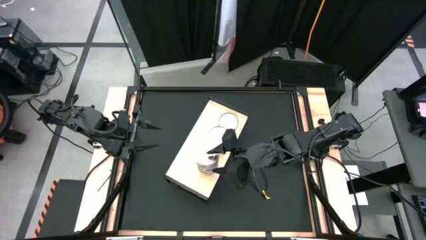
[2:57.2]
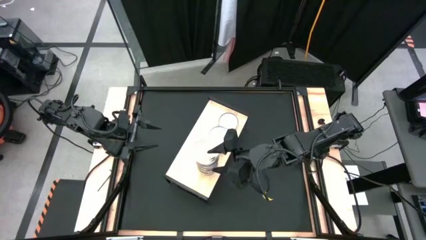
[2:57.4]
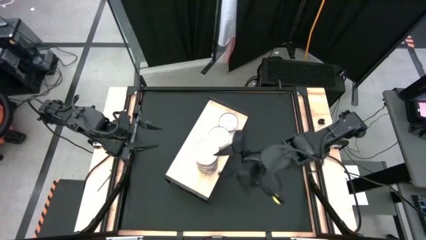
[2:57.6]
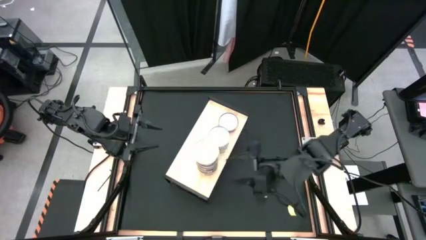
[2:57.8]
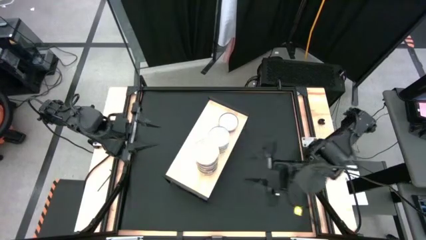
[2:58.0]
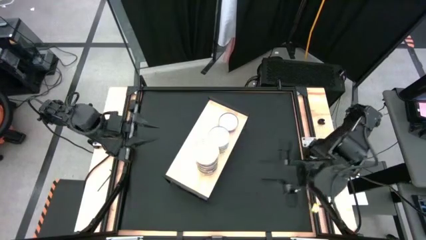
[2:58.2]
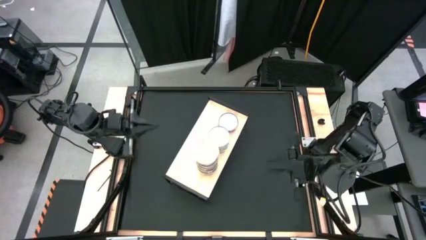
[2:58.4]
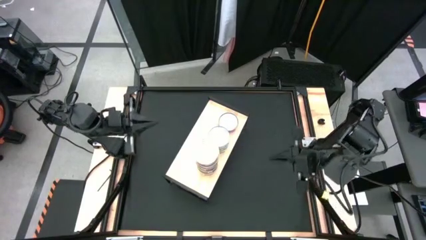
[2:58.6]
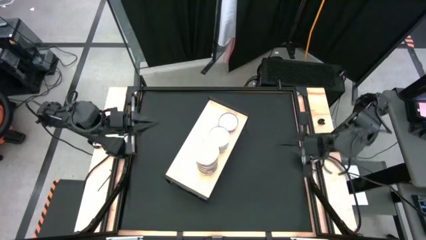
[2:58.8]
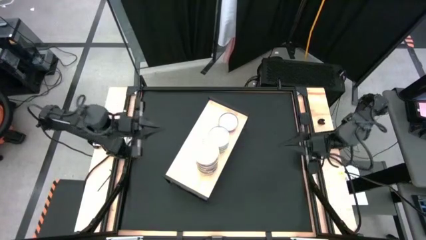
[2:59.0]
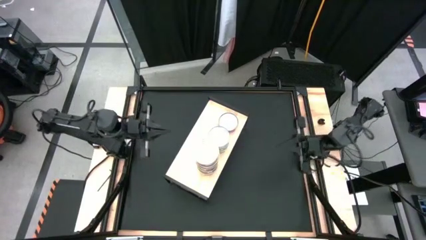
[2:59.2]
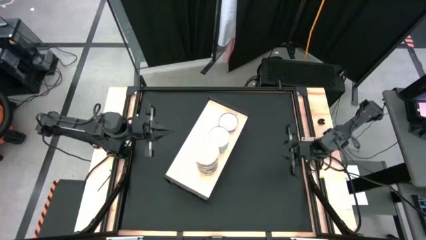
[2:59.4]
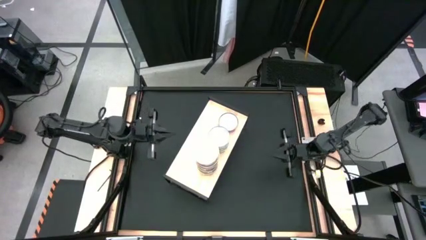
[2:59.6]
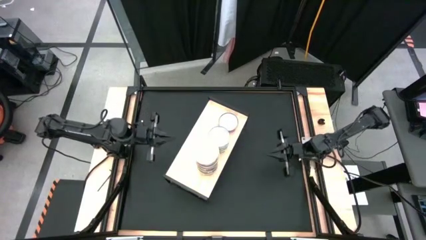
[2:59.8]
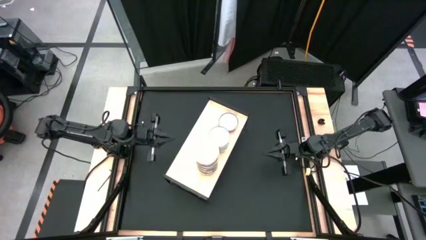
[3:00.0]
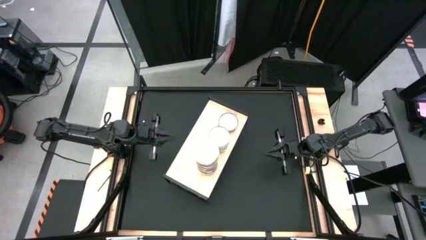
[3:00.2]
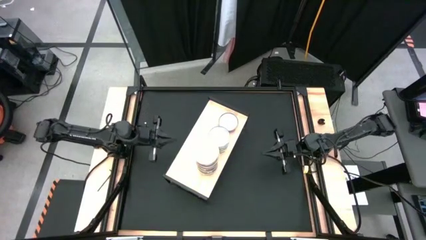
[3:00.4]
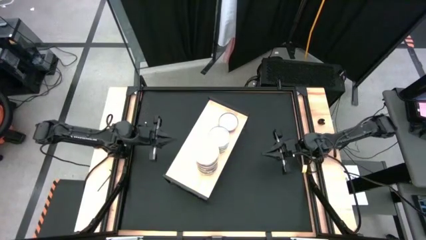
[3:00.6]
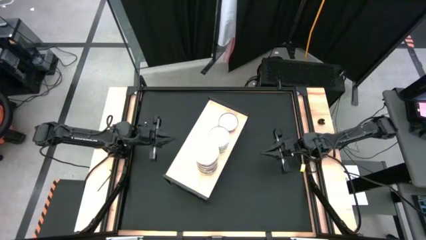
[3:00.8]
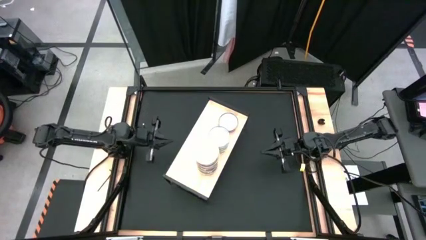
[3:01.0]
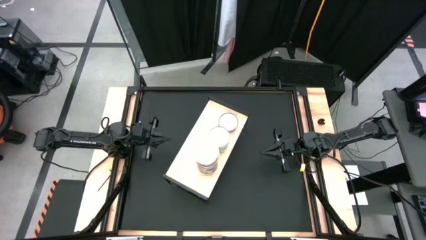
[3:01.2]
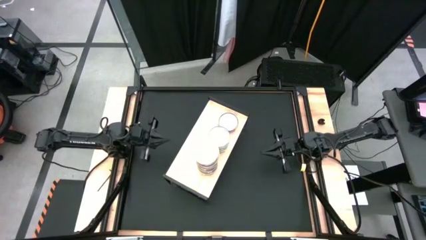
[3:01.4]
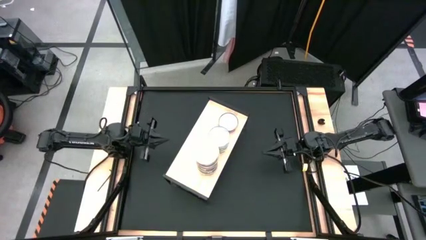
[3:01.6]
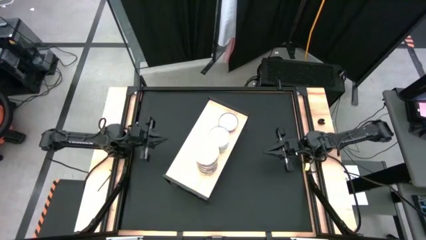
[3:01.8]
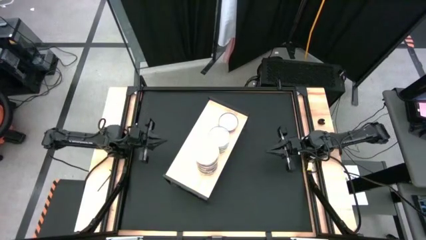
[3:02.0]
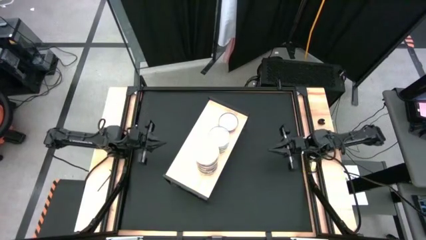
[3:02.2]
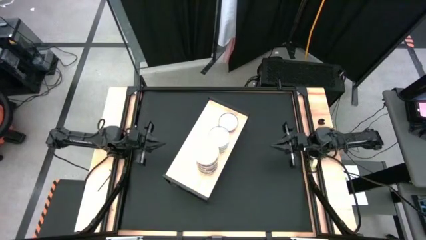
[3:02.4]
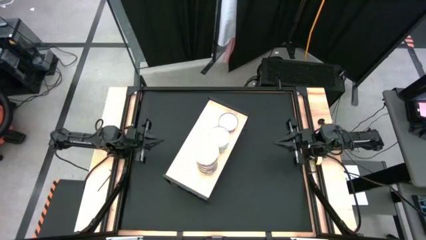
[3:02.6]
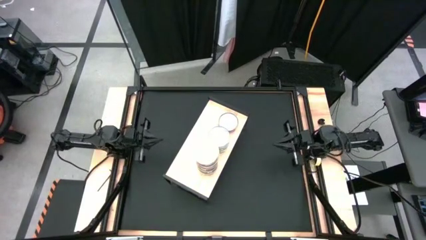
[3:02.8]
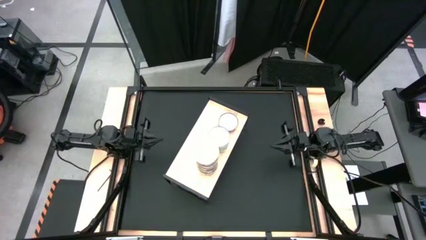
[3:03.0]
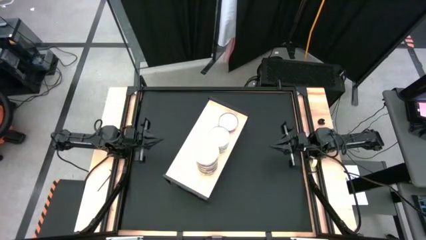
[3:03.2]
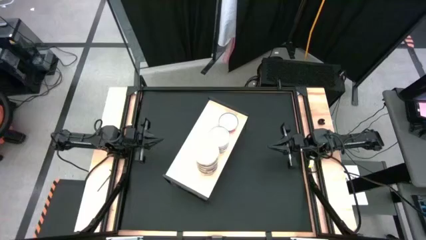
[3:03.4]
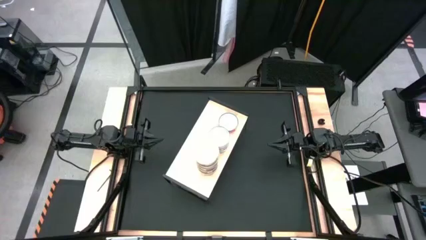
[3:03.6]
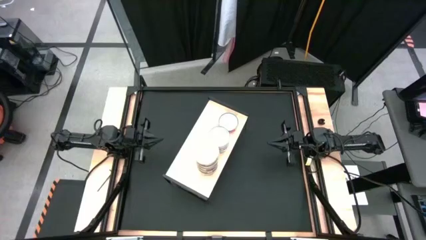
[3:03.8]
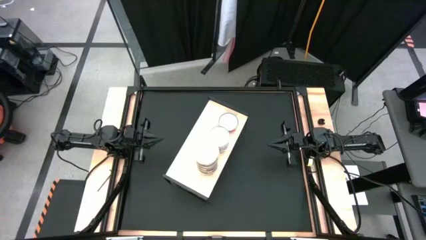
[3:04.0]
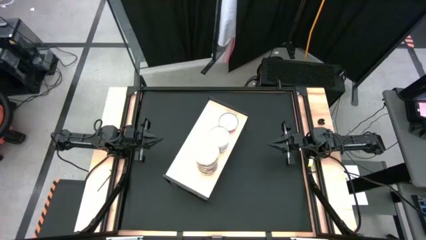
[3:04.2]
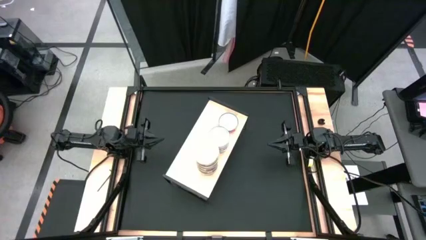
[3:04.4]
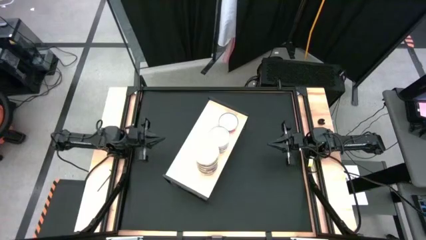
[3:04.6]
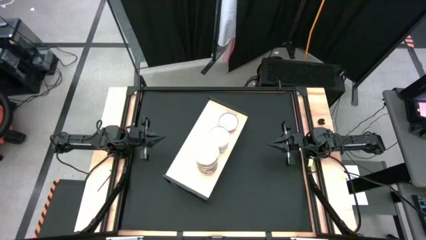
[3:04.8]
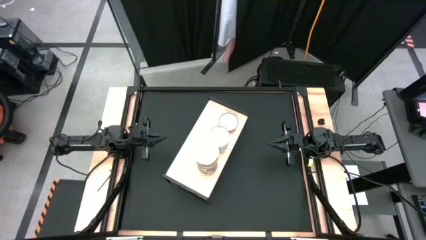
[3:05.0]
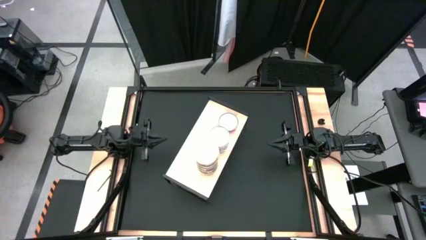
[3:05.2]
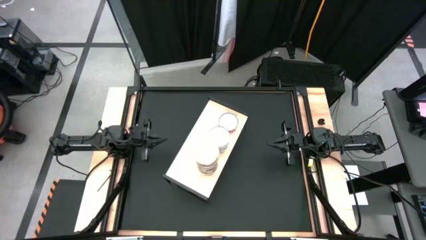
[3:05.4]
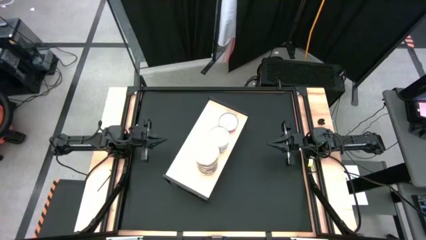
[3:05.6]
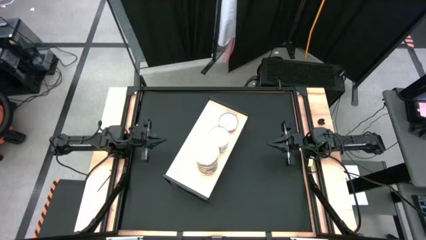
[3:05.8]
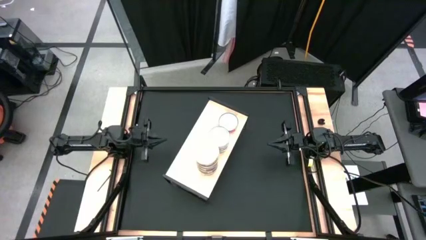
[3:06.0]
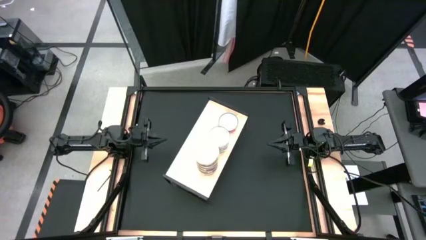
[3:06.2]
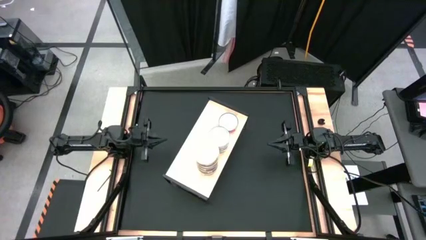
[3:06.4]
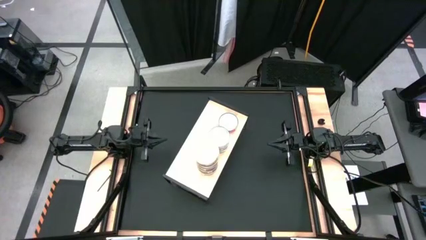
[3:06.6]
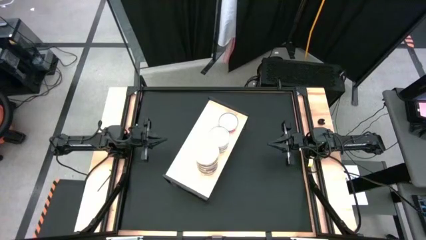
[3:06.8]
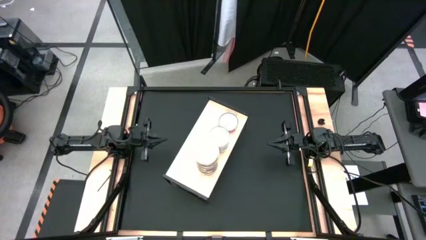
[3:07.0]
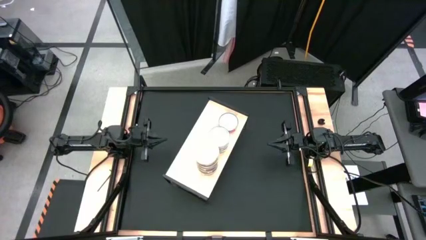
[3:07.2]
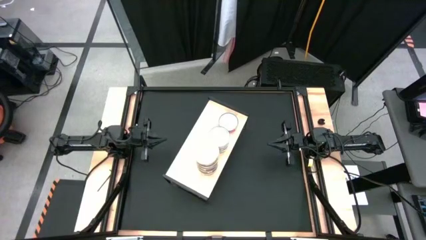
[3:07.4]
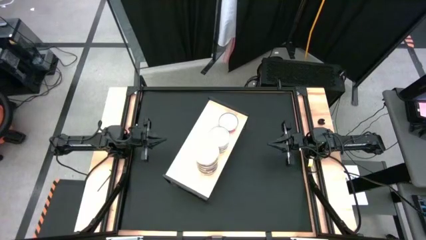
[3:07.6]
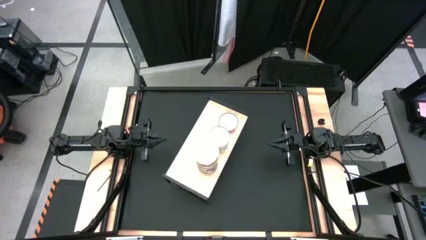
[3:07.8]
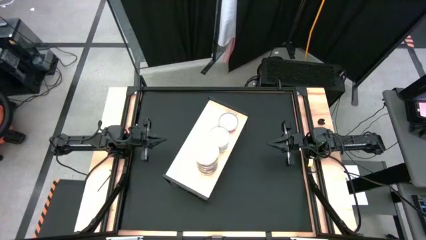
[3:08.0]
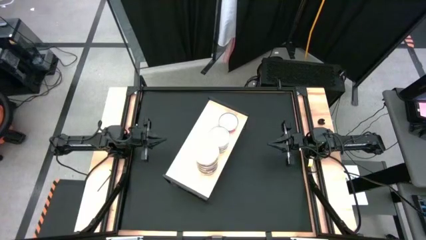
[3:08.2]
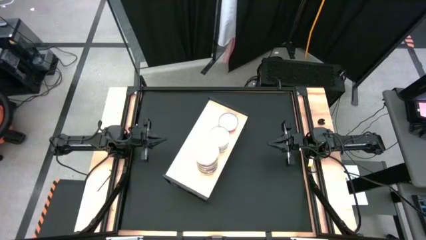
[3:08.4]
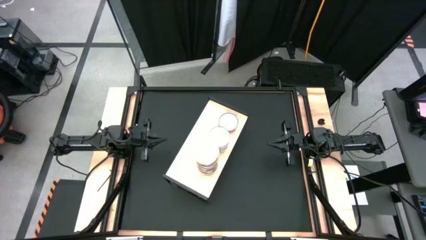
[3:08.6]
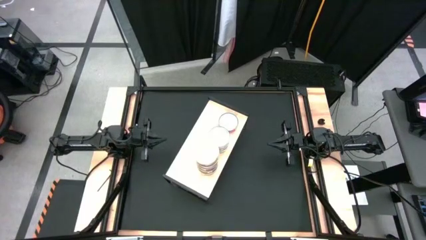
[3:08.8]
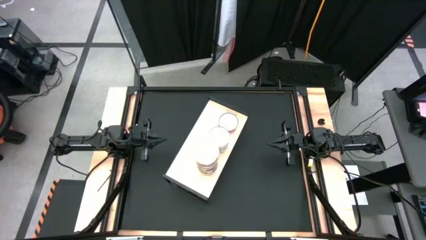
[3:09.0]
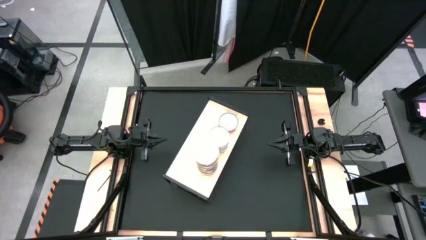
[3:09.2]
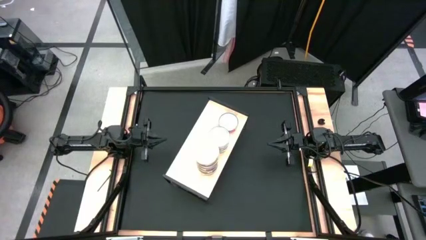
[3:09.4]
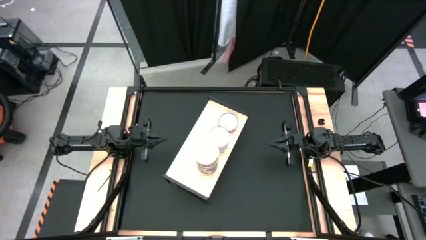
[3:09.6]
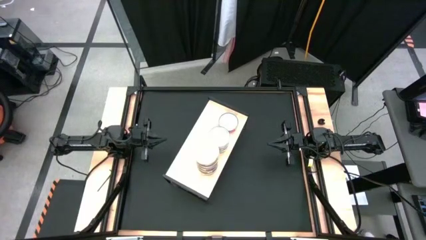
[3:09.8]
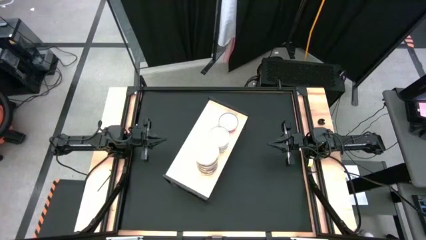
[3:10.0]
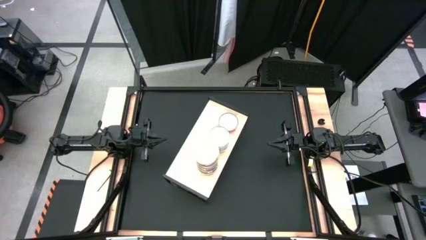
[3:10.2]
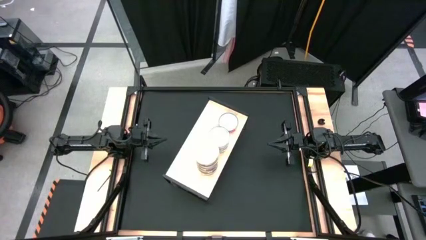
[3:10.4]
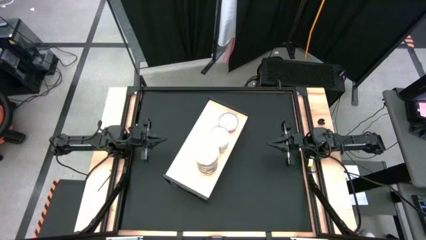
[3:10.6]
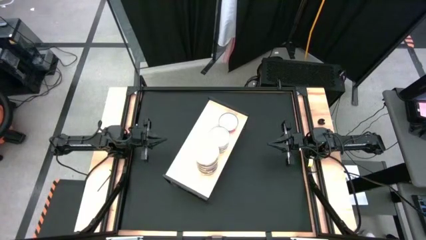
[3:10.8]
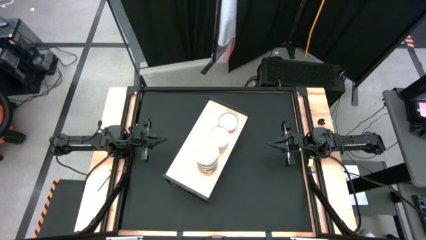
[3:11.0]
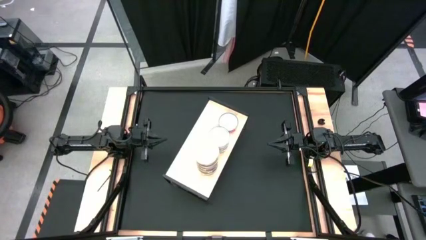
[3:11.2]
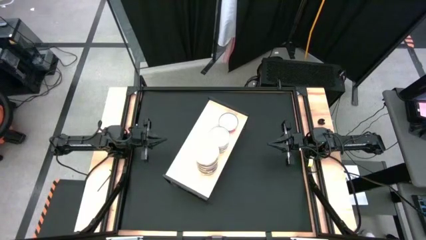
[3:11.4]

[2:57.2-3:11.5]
Task: Stack canned seafood by type on shelf
Return to Home Position
